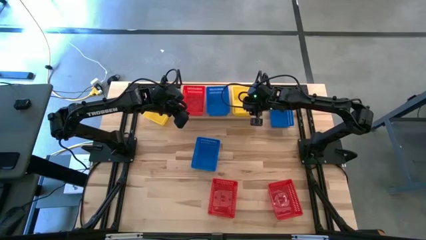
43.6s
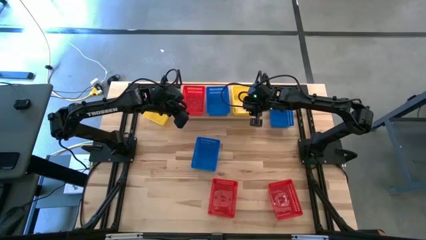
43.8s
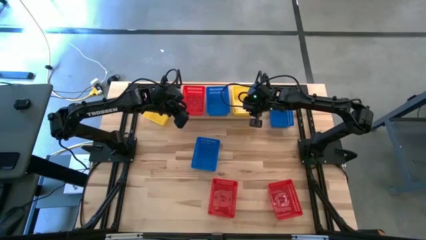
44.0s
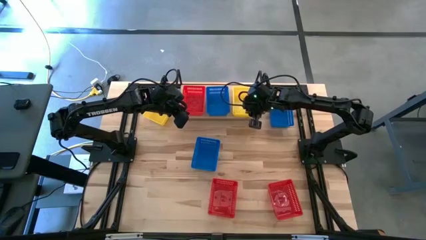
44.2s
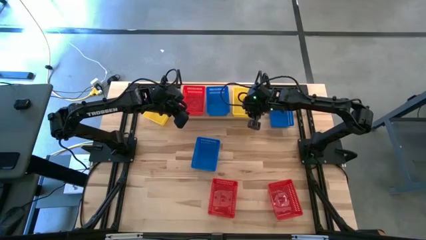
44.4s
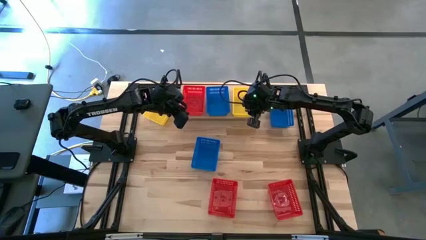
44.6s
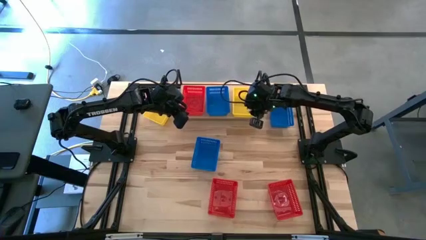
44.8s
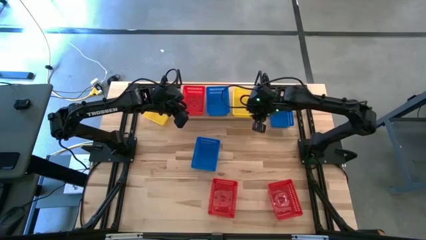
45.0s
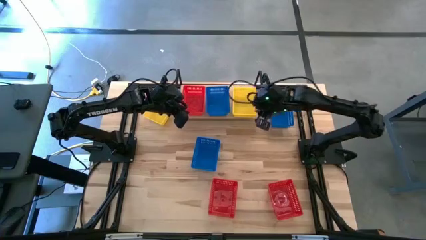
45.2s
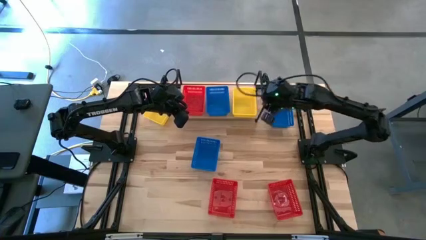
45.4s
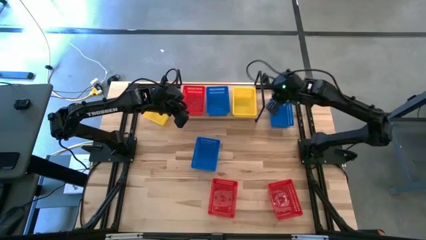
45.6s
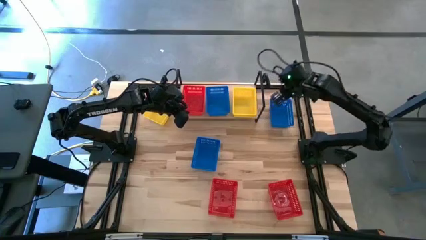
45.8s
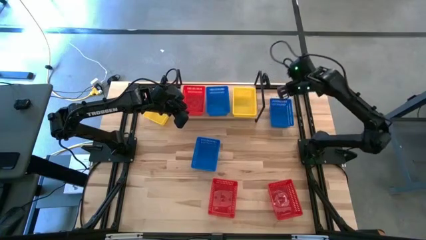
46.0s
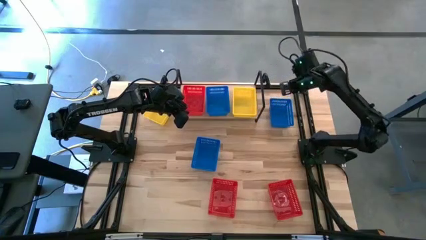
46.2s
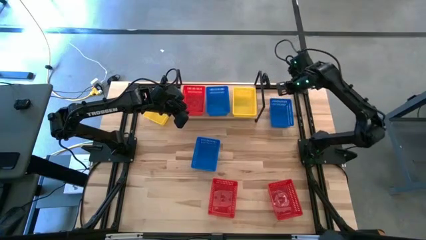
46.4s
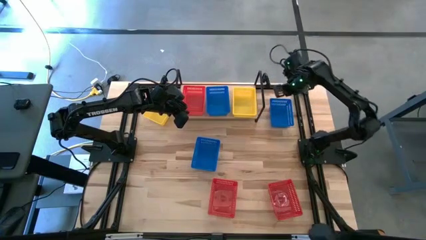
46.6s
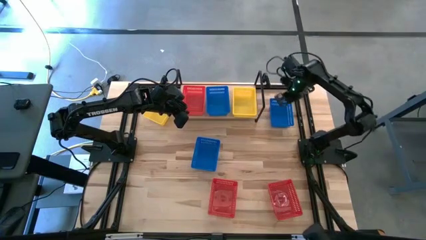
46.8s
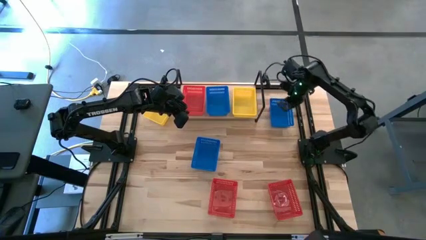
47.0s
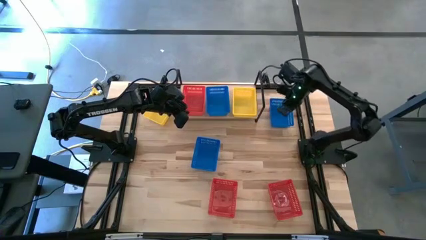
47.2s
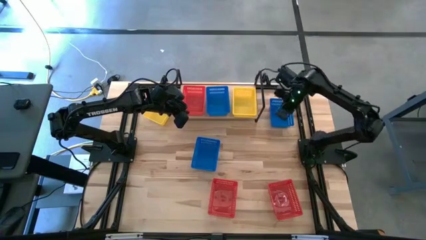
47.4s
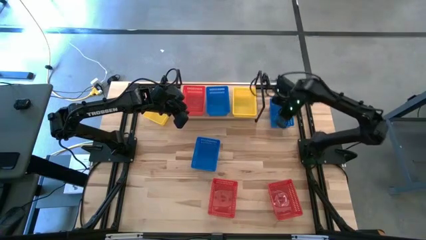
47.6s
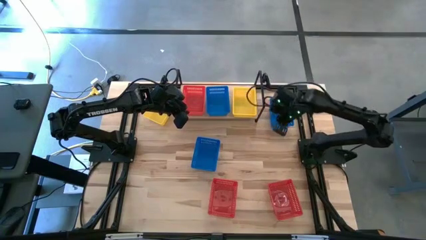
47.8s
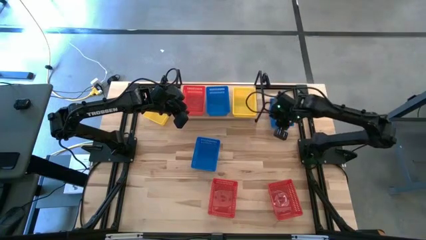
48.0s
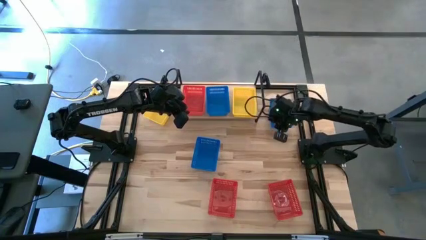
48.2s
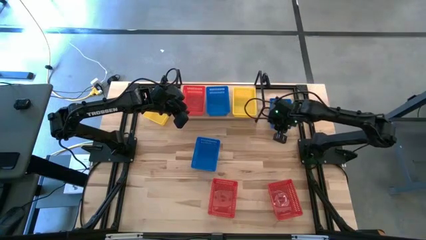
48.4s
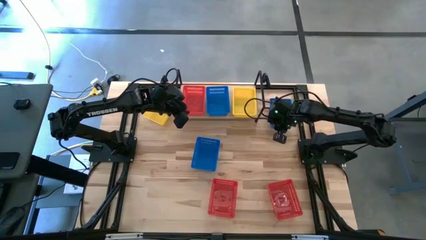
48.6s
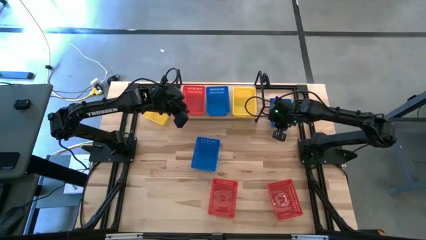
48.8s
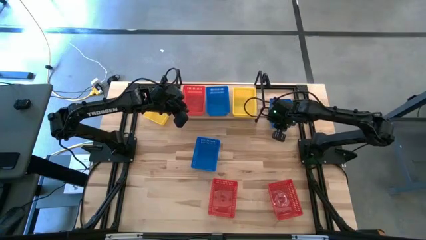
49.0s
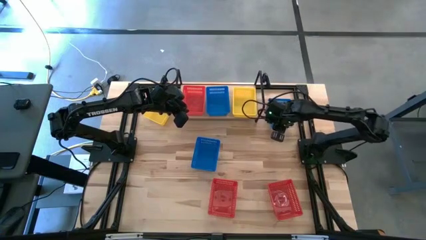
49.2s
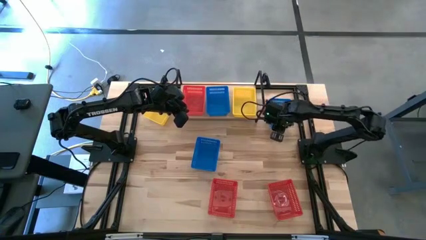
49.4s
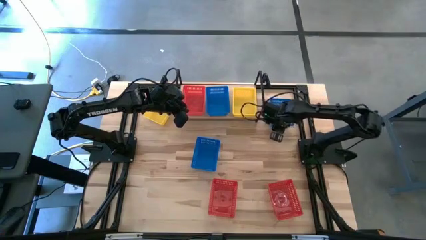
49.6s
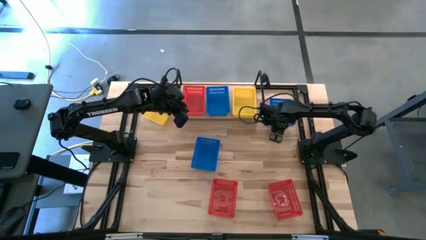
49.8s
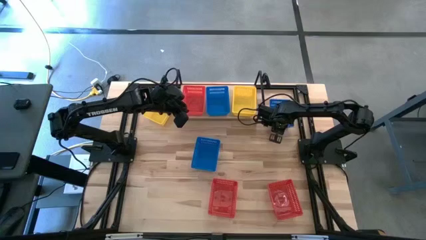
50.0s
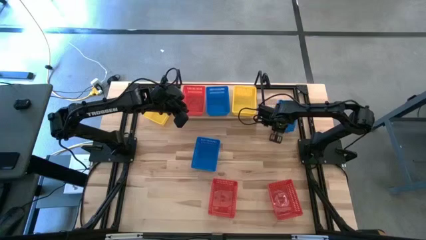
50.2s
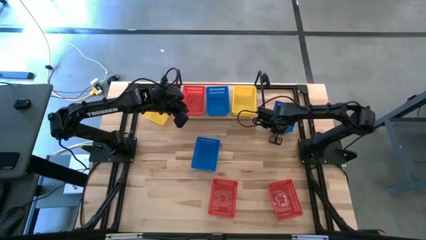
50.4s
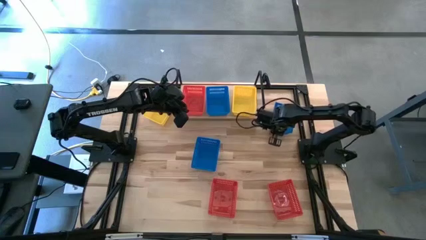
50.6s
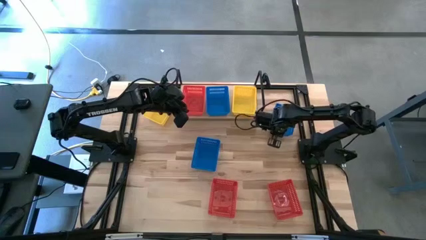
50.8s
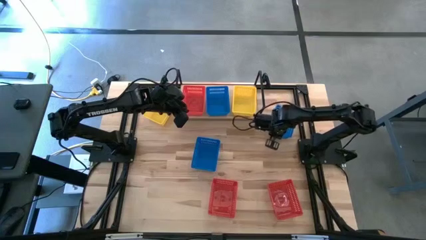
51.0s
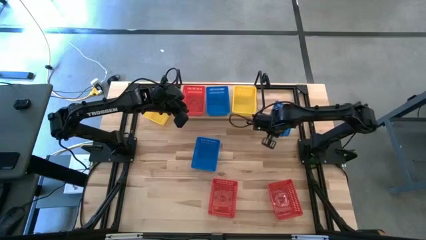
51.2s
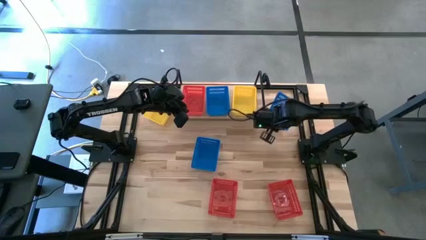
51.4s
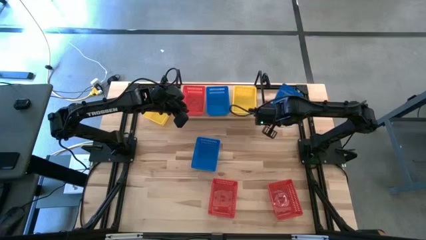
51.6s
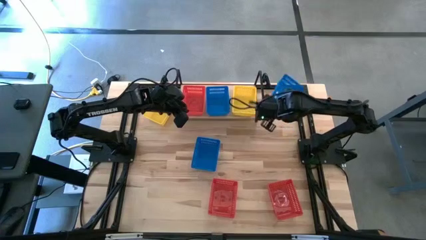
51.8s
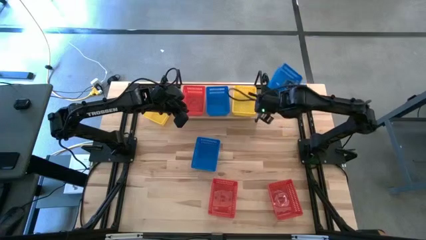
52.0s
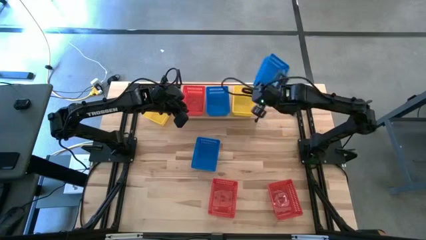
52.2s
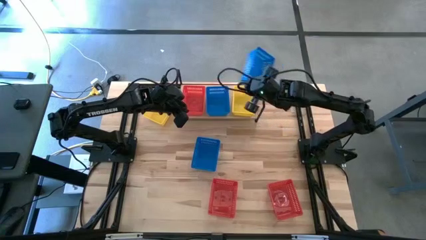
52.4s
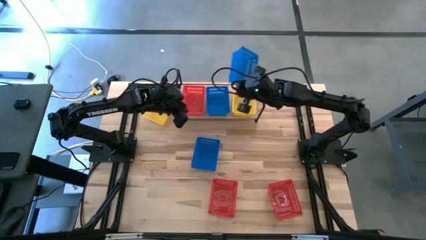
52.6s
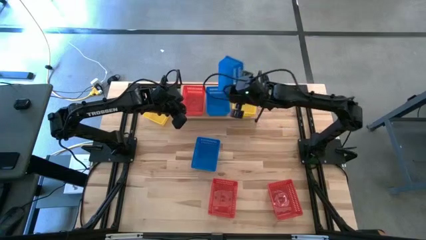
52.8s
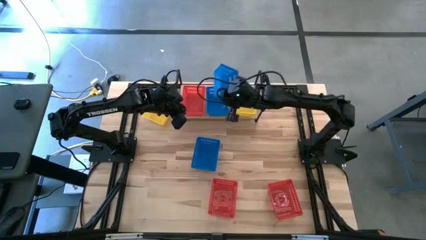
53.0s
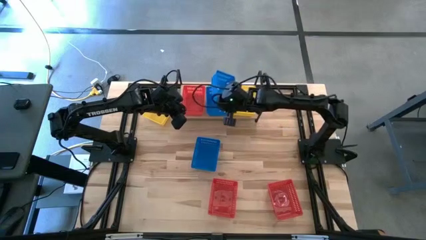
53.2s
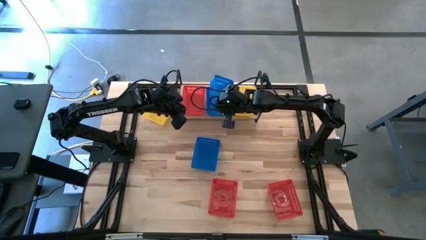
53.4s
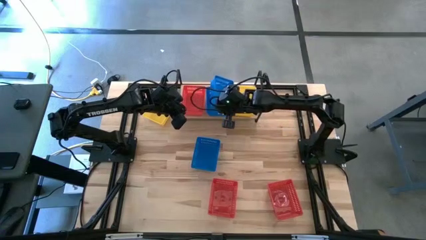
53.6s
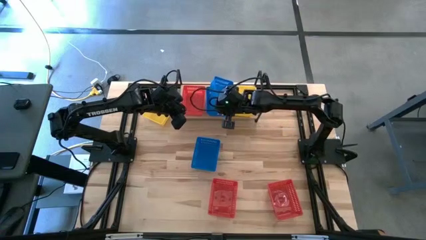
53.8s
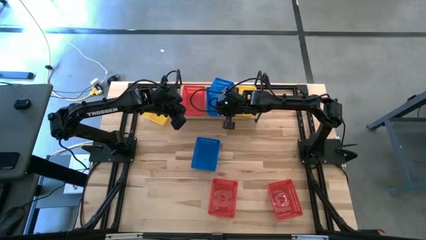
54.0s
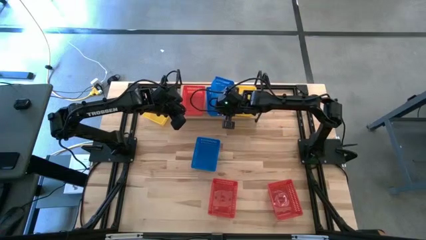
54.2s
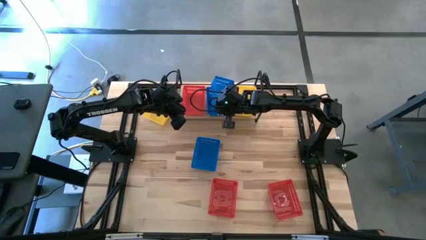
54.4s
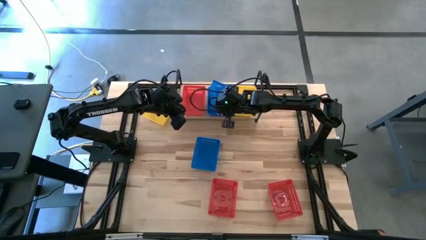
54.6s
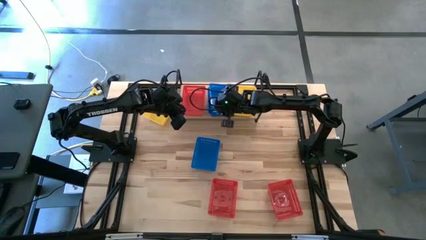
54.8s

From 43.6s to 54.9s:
Task: Stack baskets on shelf by color
Stack the right blue bin on top of the blue bin on the shelf
